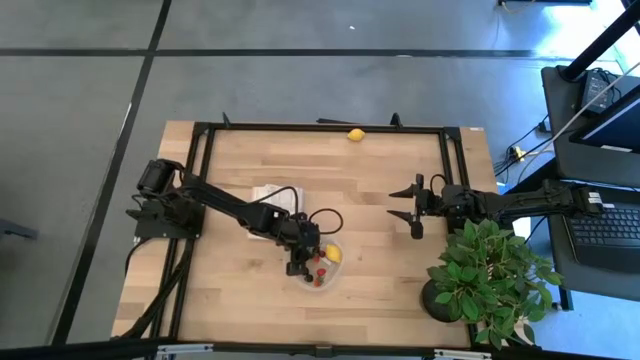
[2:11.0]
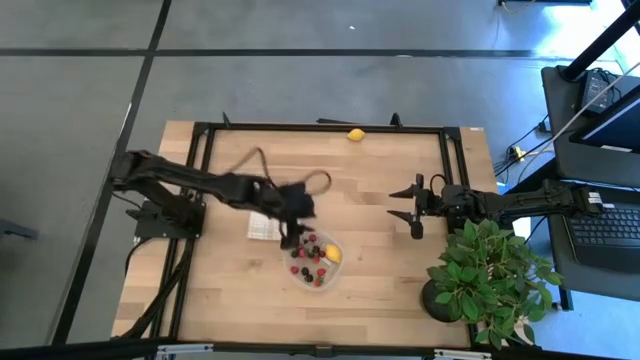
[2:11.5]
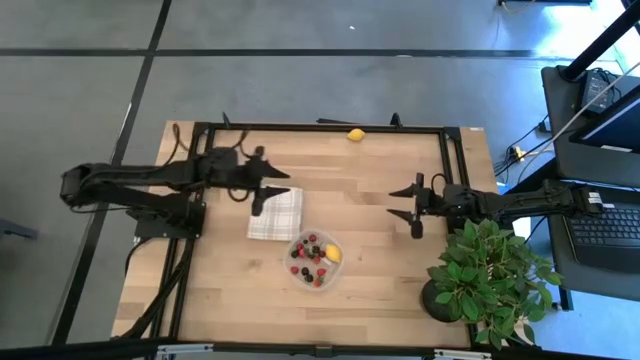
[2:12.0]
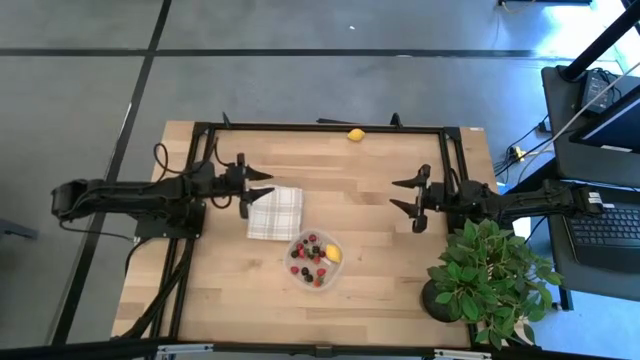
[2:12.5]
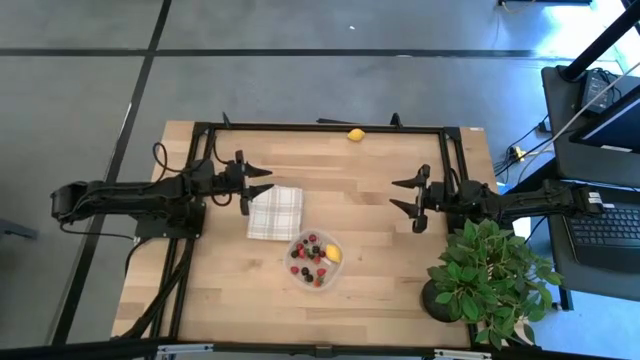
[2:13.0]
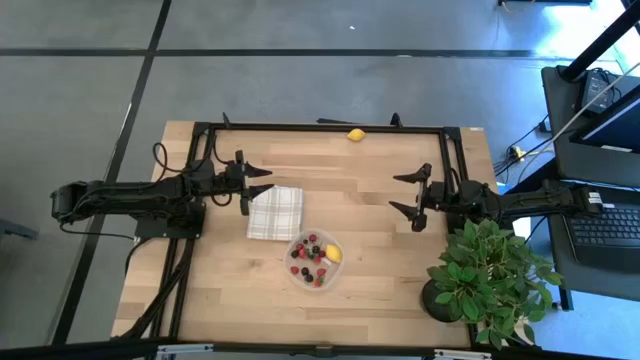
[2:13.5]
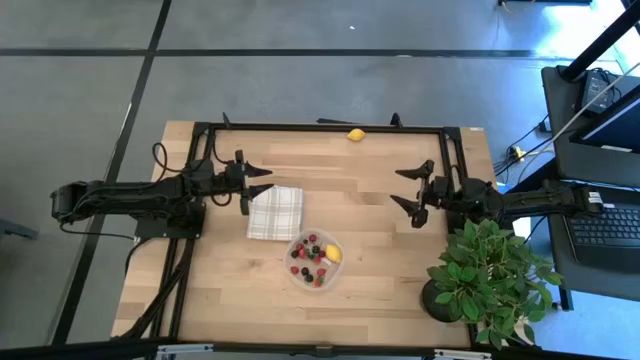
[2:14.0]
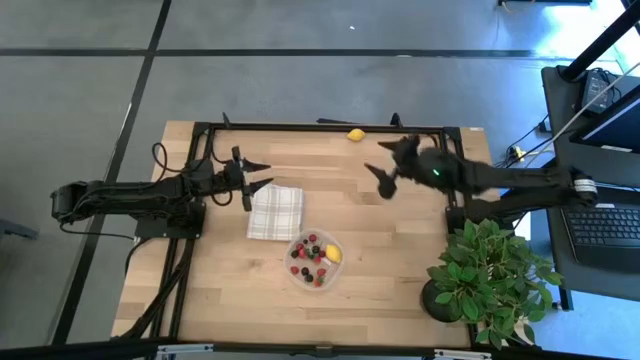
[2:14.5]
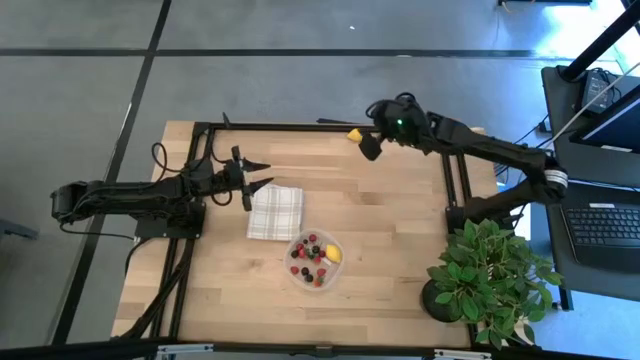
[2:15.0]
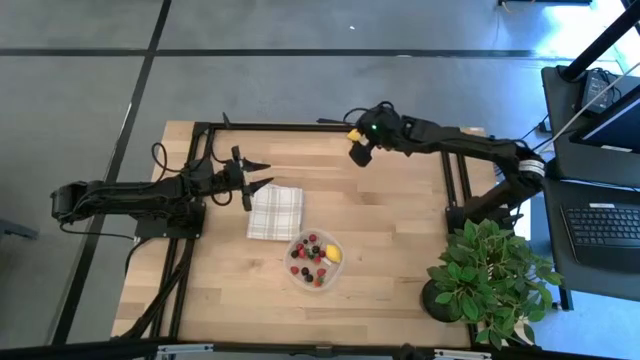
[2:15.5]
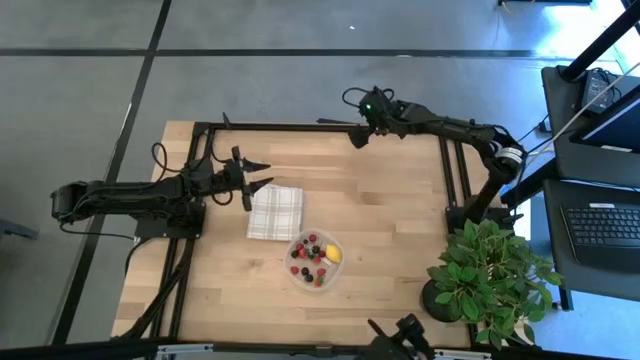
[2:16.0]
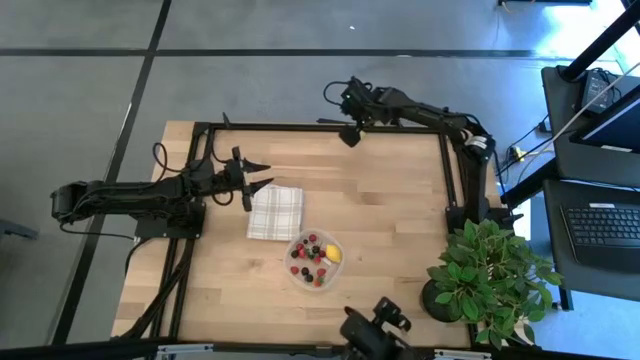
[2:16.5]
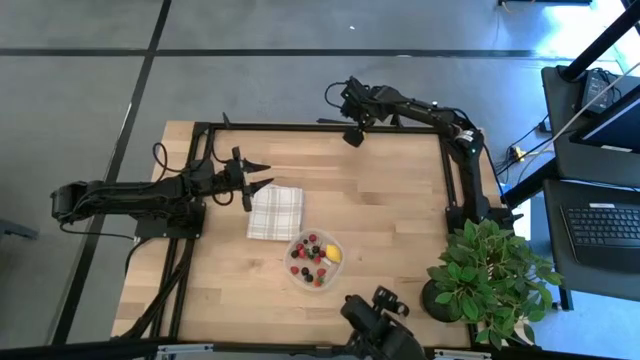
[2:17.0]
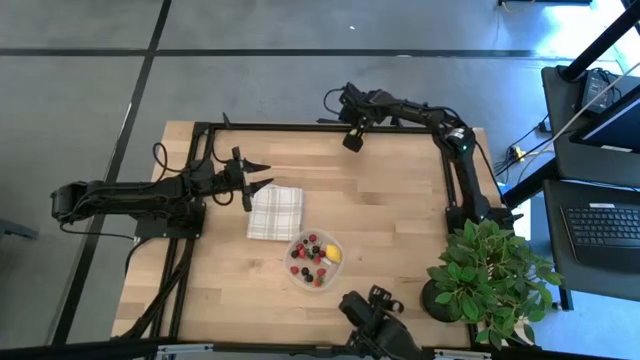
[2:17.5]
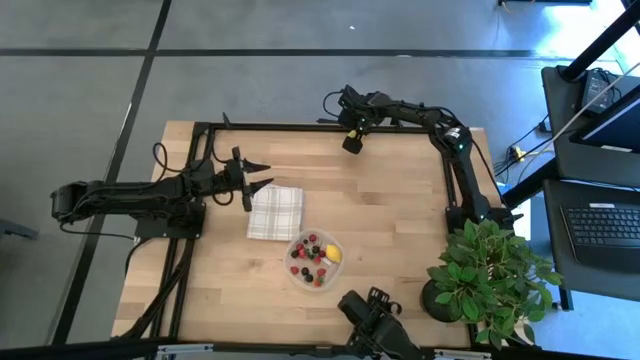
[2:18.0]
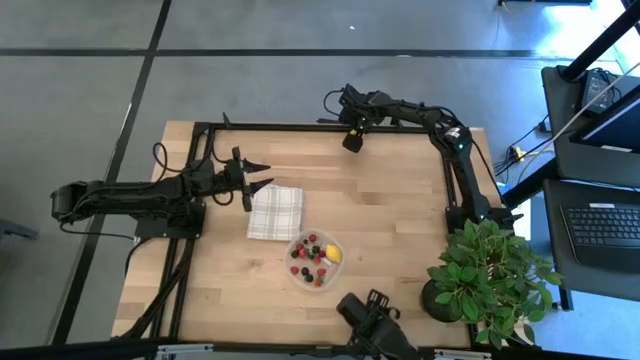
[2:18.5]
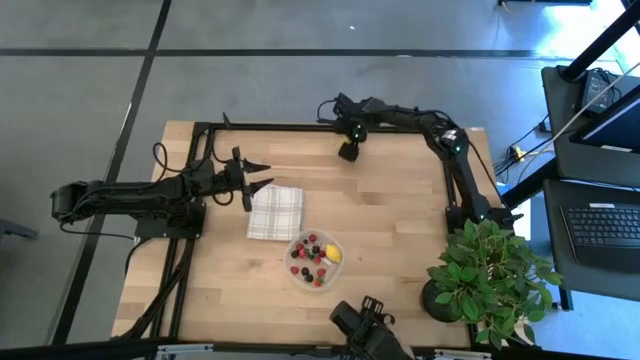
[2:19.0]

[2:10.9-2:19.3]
Task: Pick and placing Produce into tupperware
Put the lemon into the transparent container

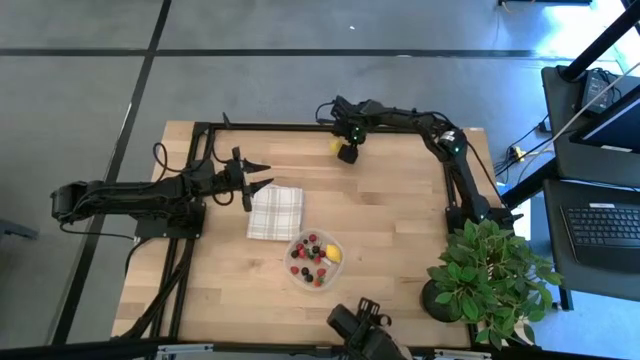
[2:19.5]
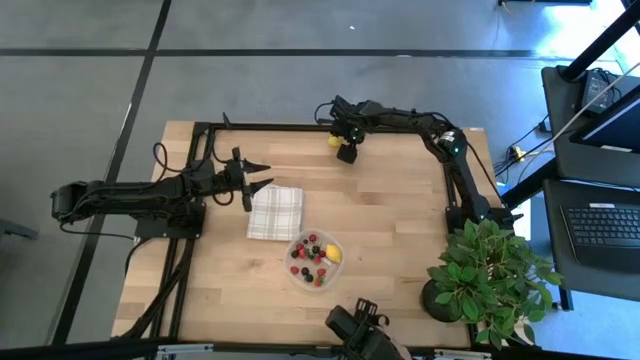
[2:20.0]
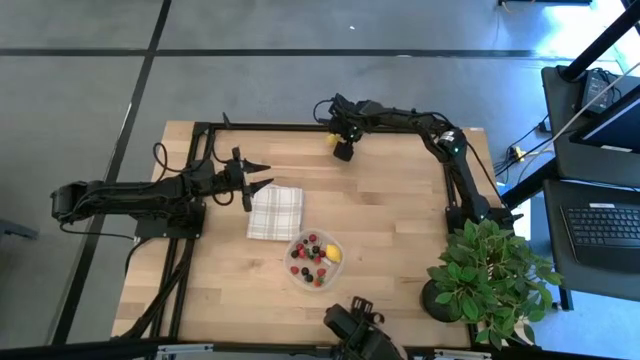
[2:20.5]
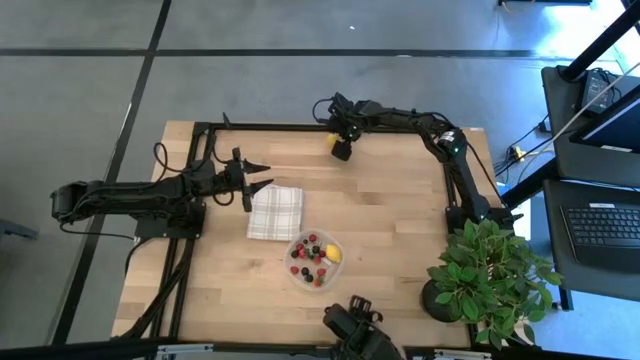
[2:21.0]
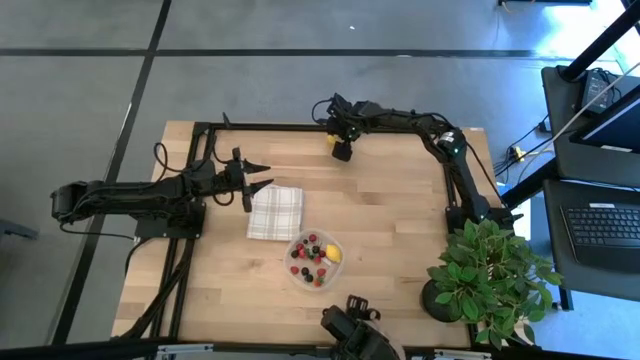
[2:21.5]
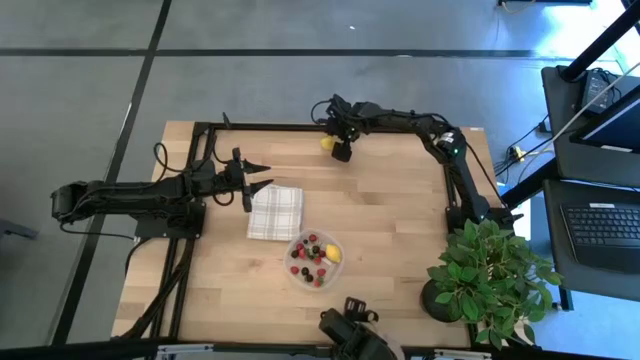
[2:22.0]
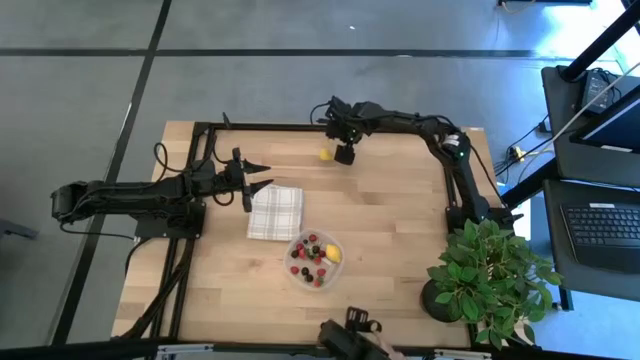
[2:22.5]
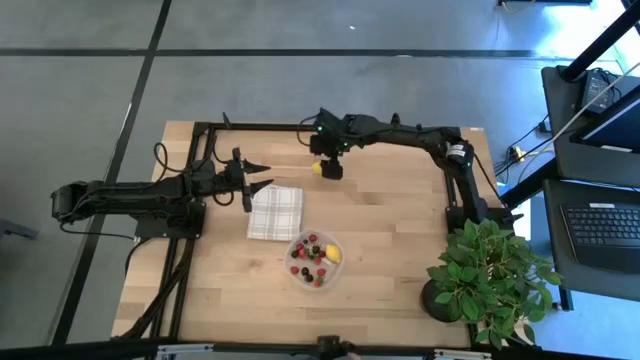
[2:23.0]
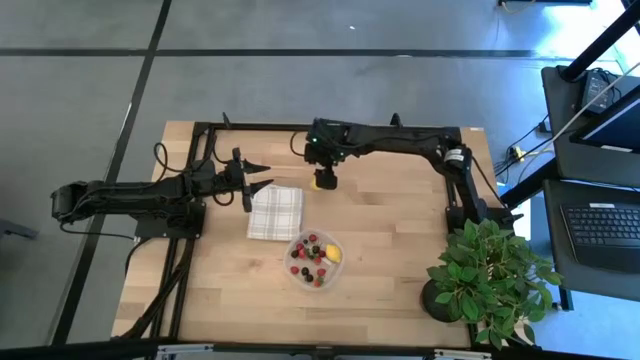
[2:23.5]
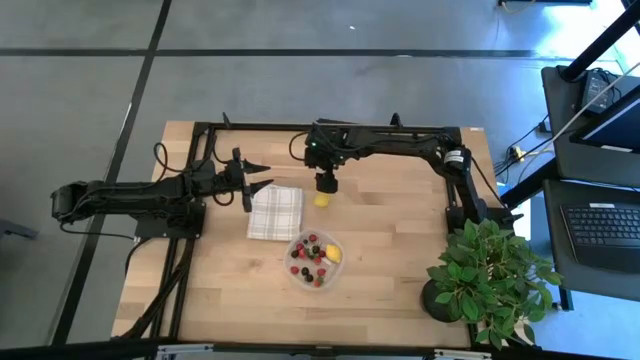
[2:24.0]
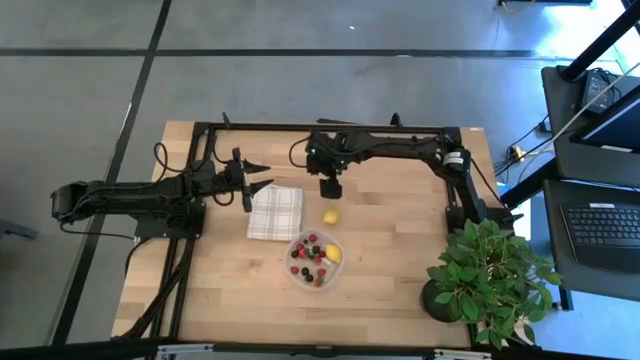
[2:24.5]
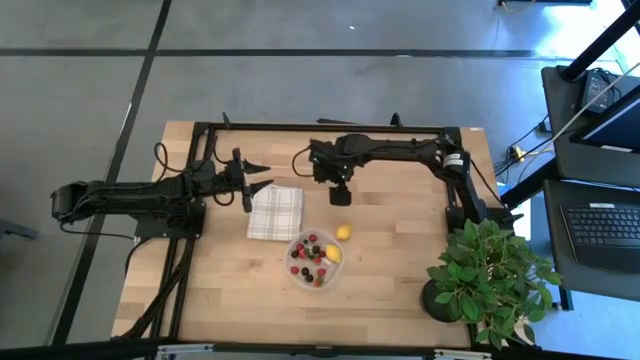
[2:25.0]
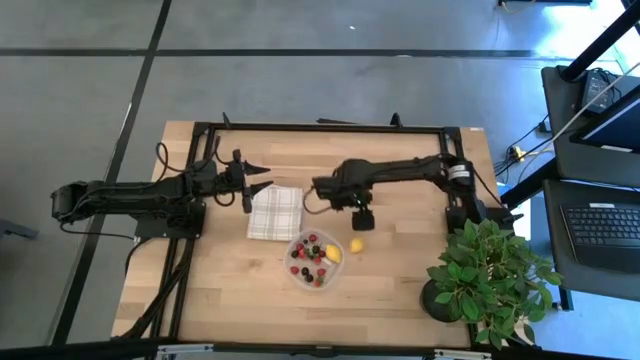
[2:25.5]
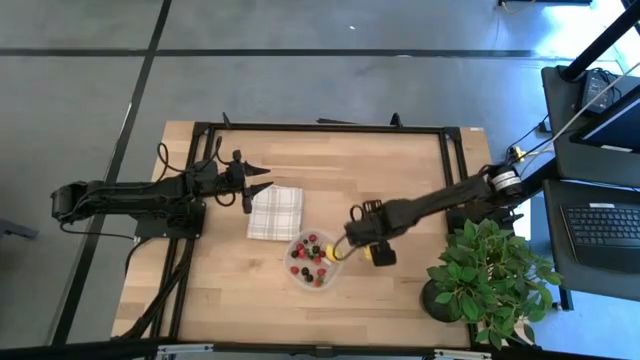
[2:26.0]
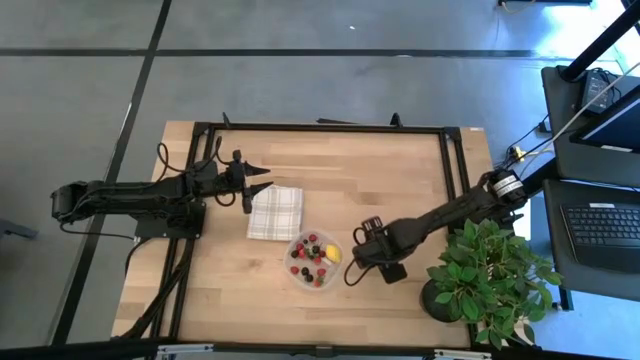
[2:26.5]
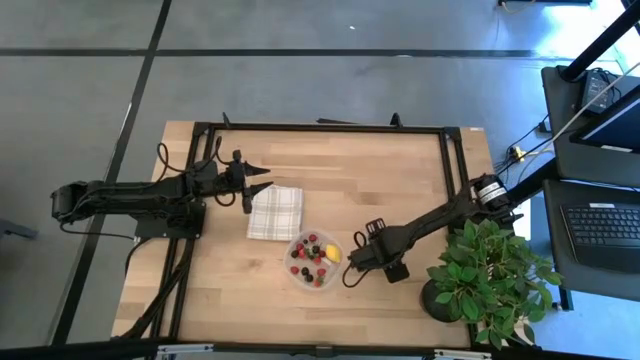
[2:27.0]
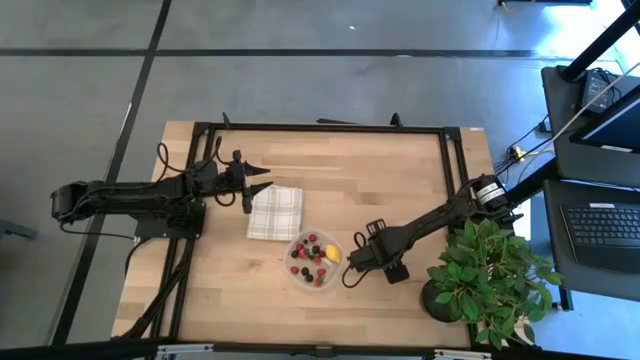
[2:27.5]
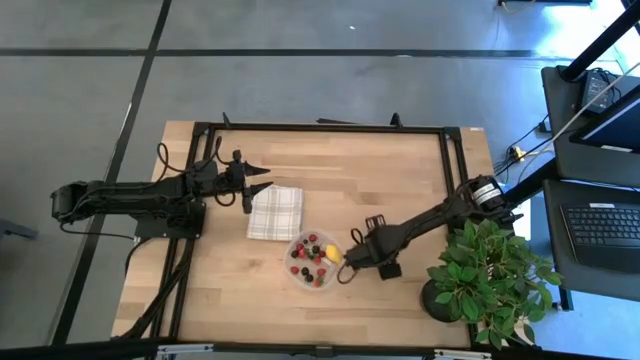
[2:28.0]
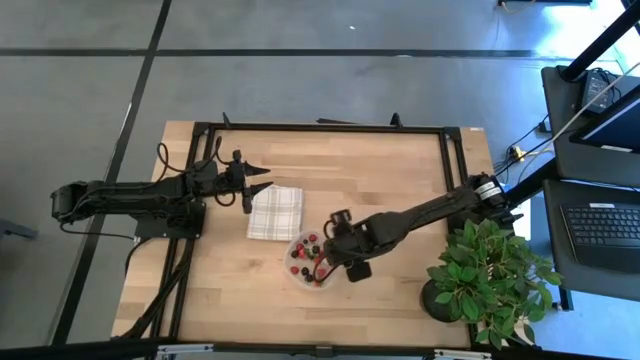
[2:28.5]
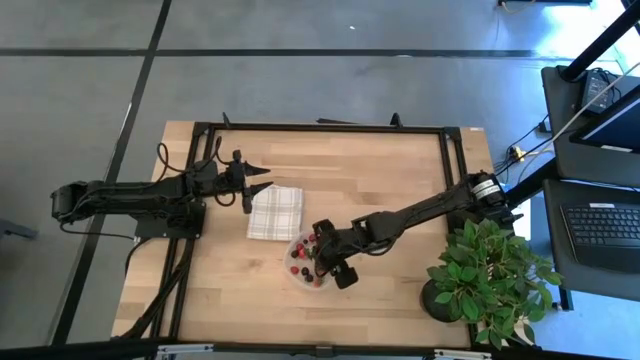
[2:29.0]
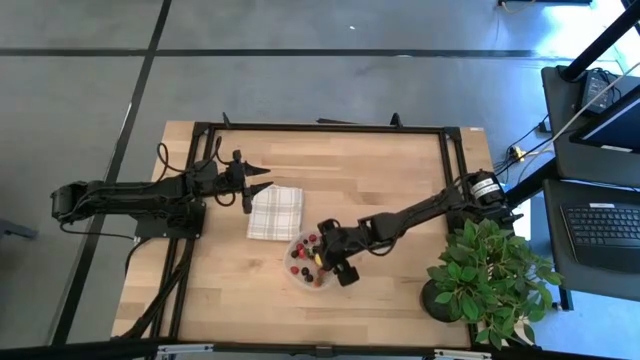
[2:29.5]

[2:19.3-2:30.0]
Put the lemon into the transparent container

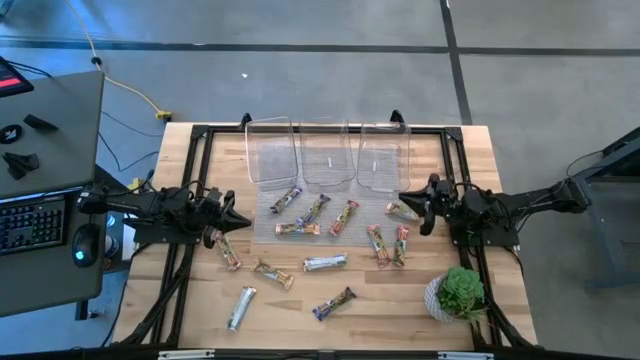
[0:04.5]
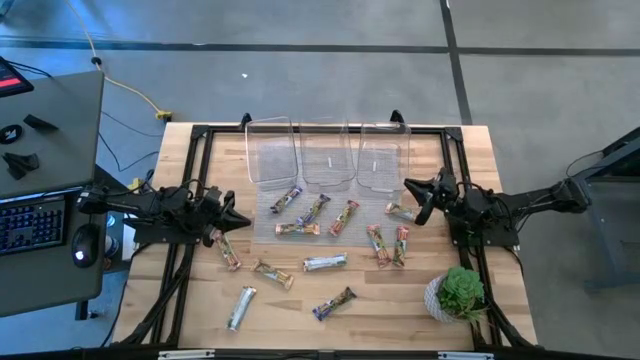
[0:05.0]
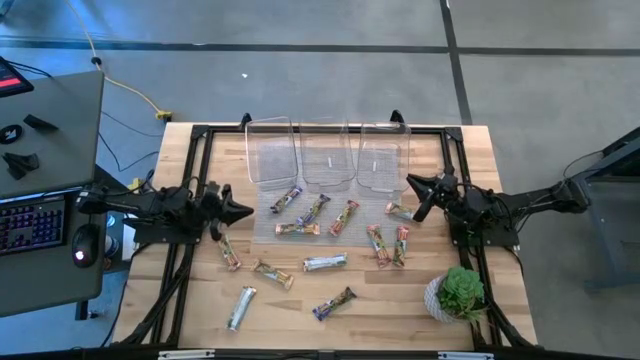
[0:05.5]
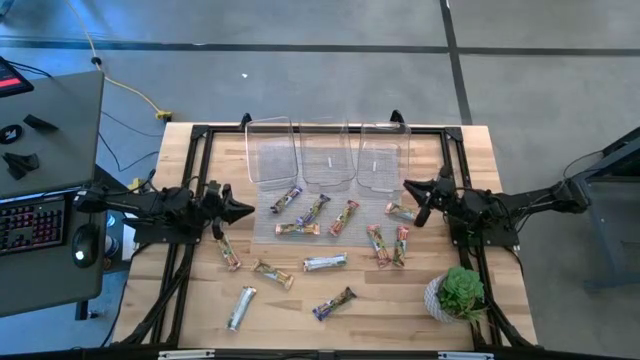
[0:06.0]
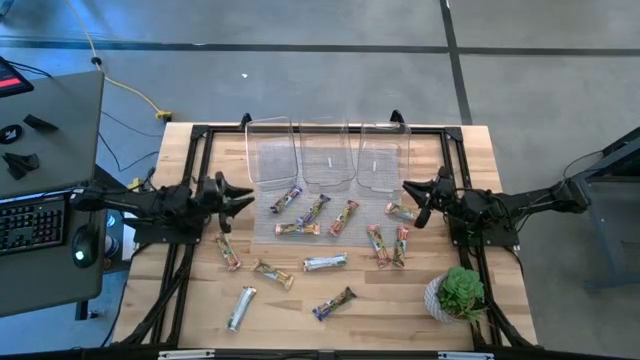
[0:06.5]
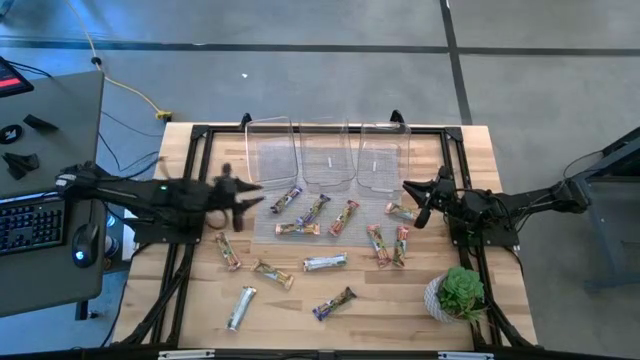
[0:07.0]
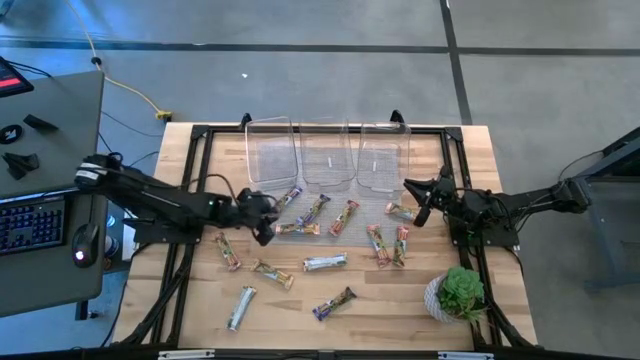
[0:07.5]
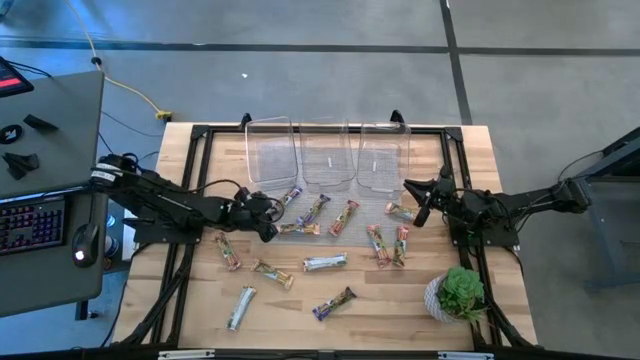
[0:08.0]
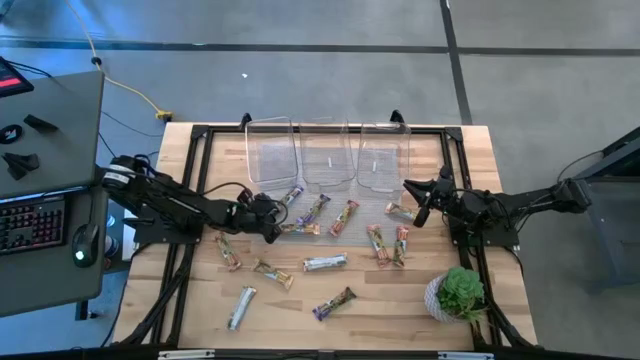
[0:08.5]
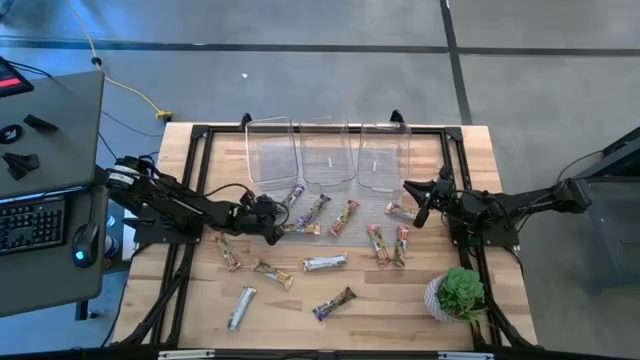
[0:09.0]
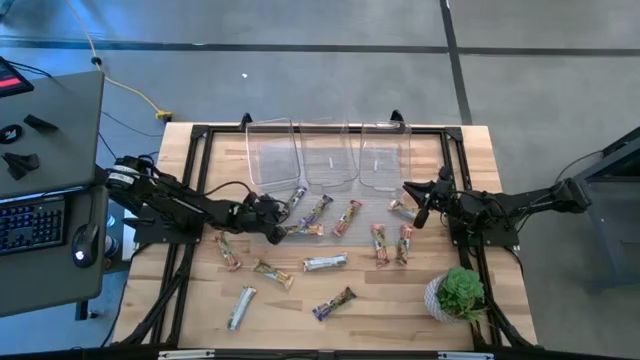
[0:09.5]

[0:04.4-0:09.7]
Task: Pick and place Granola Bars by type
Put the blue granola bar into the left transparent bin
